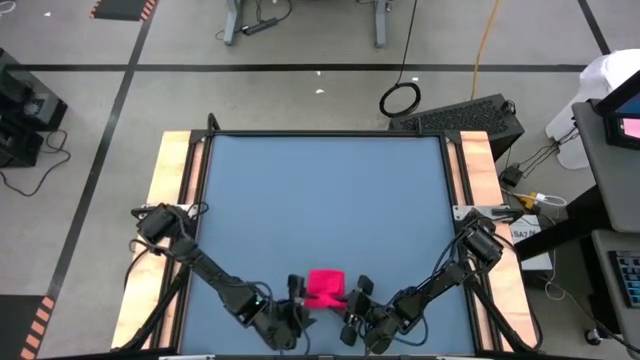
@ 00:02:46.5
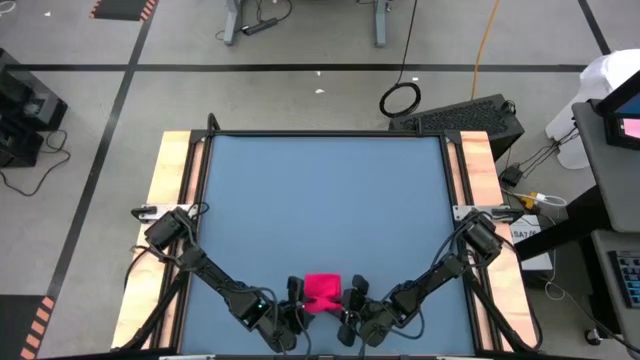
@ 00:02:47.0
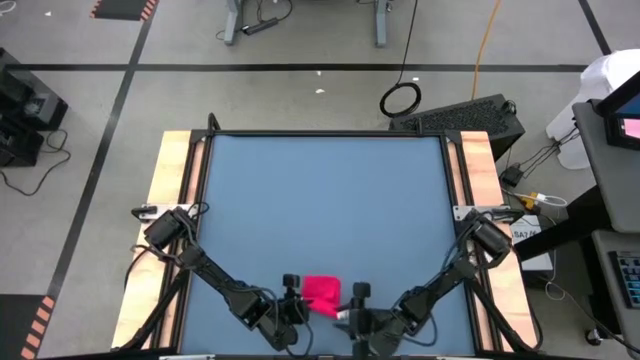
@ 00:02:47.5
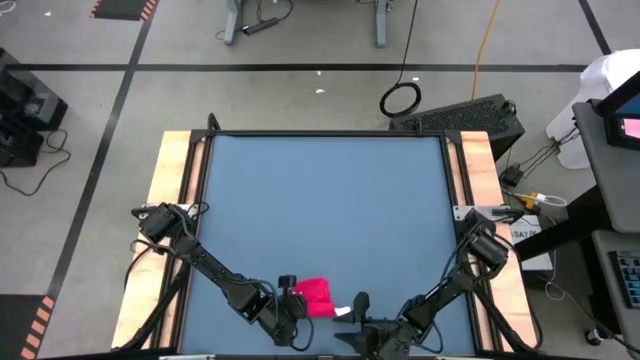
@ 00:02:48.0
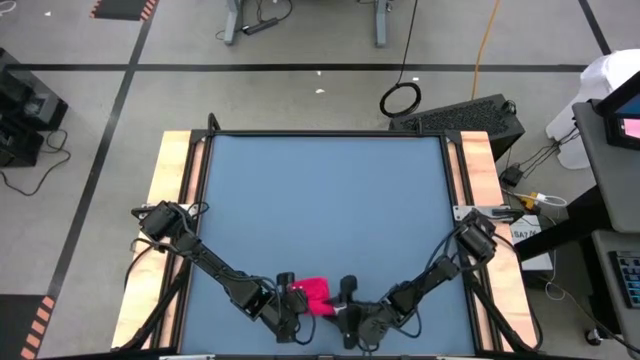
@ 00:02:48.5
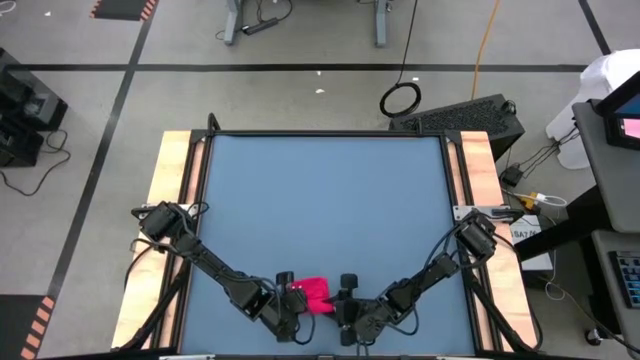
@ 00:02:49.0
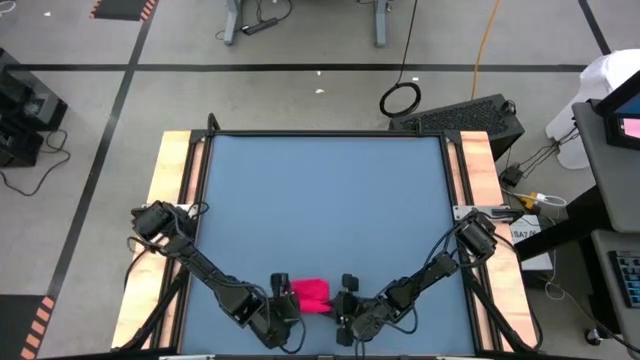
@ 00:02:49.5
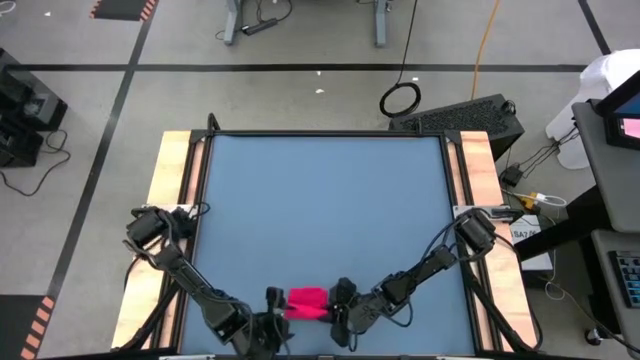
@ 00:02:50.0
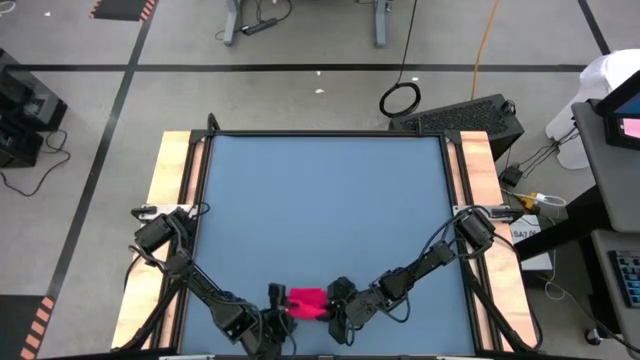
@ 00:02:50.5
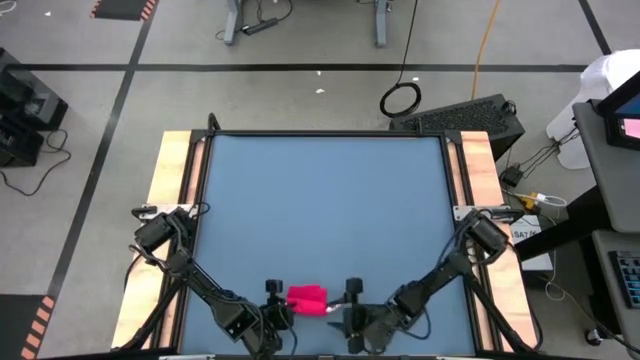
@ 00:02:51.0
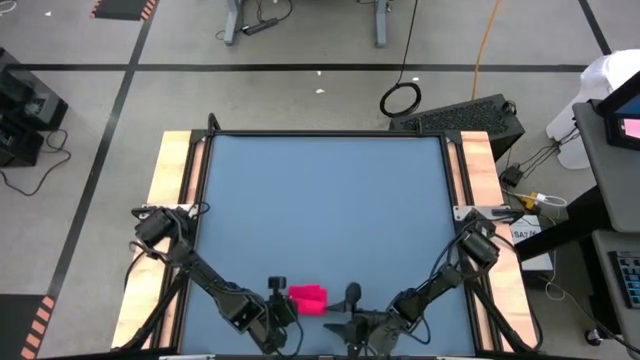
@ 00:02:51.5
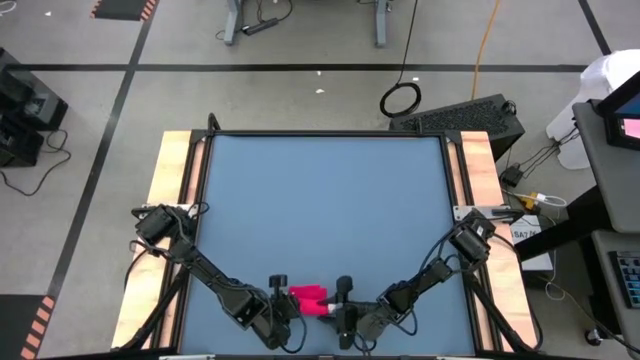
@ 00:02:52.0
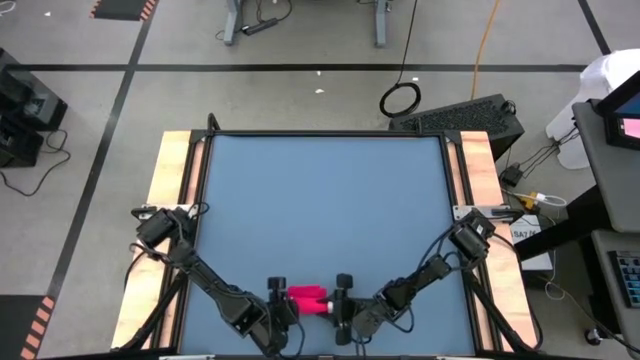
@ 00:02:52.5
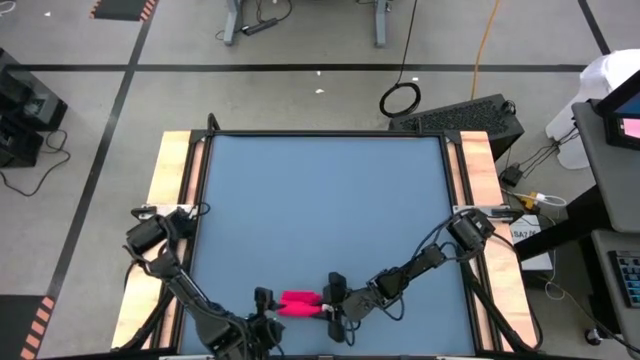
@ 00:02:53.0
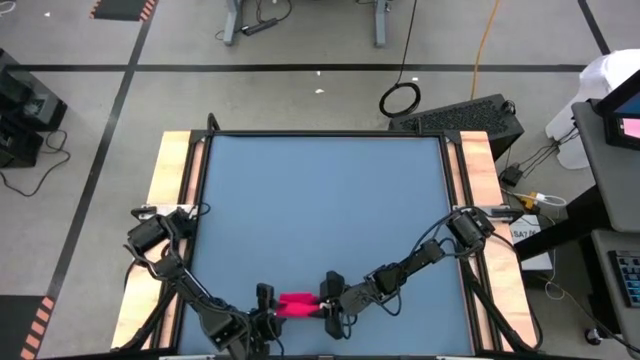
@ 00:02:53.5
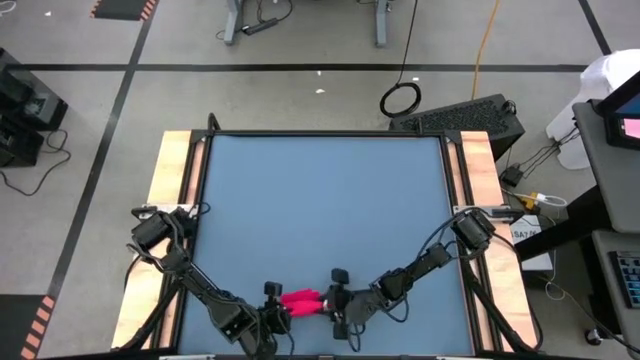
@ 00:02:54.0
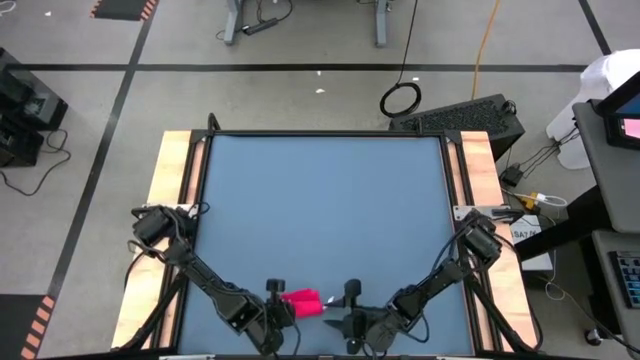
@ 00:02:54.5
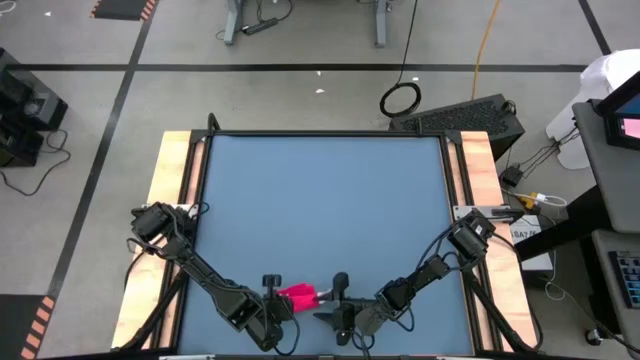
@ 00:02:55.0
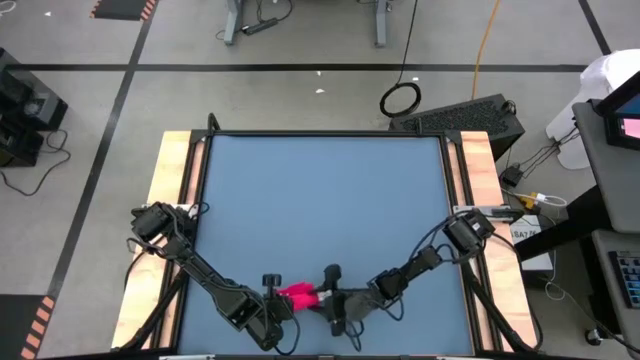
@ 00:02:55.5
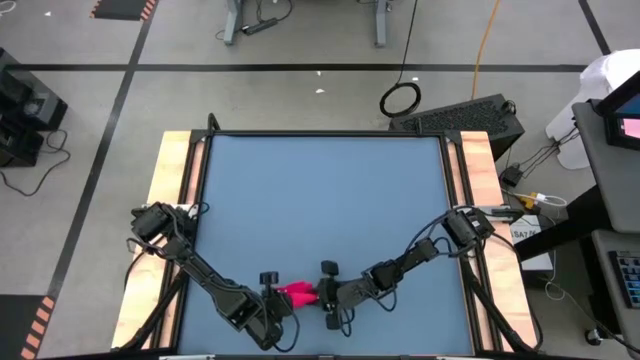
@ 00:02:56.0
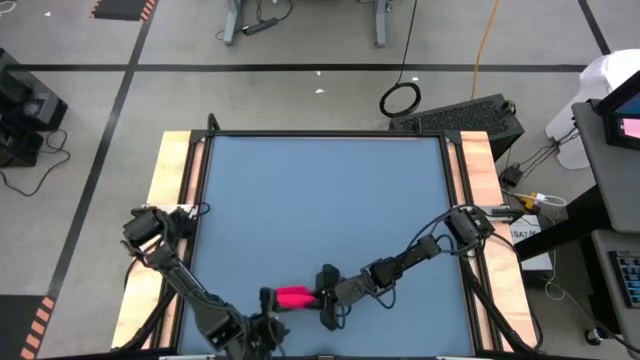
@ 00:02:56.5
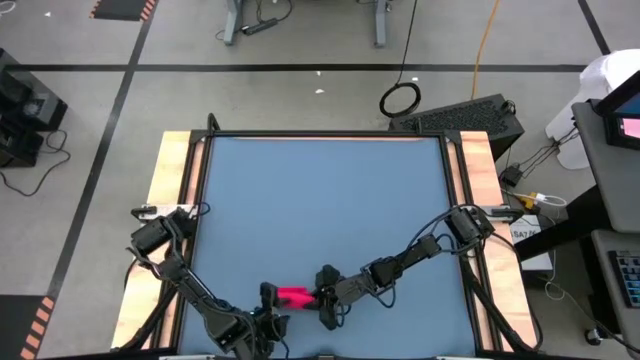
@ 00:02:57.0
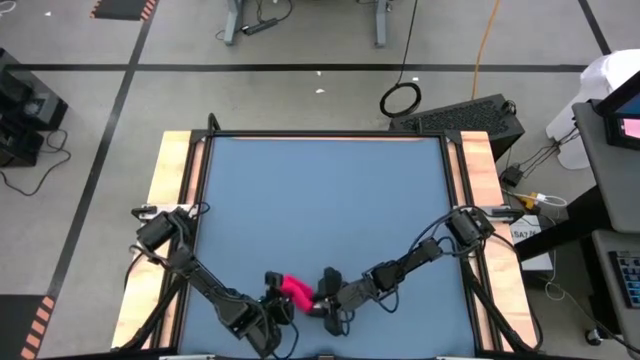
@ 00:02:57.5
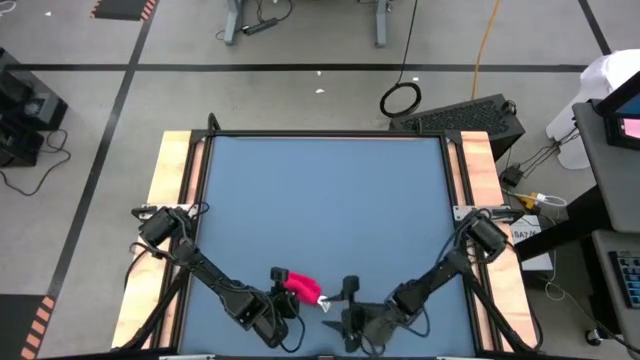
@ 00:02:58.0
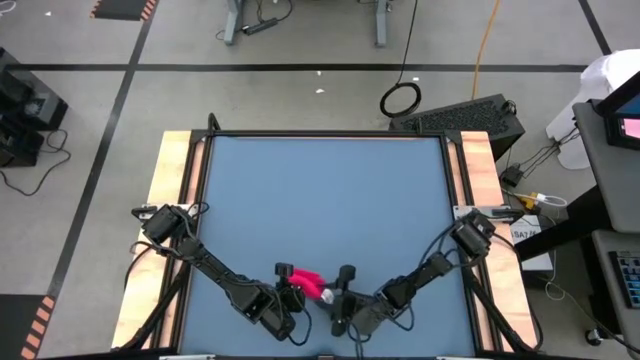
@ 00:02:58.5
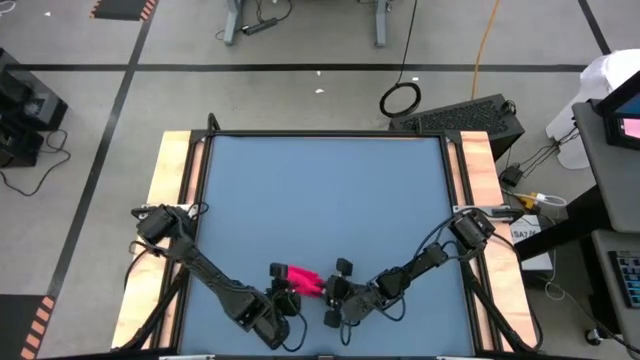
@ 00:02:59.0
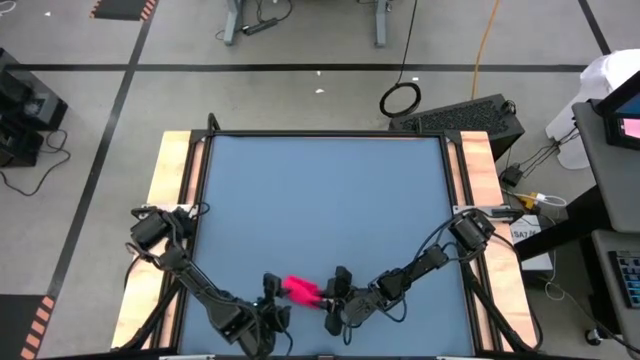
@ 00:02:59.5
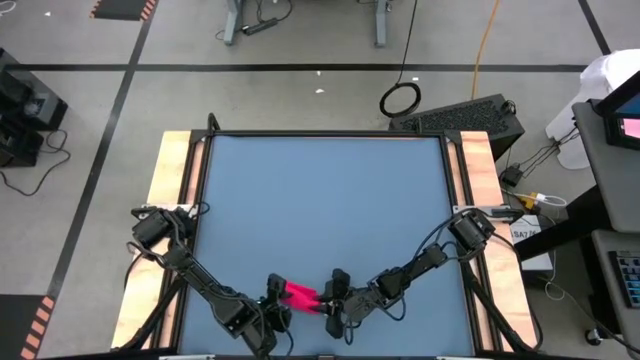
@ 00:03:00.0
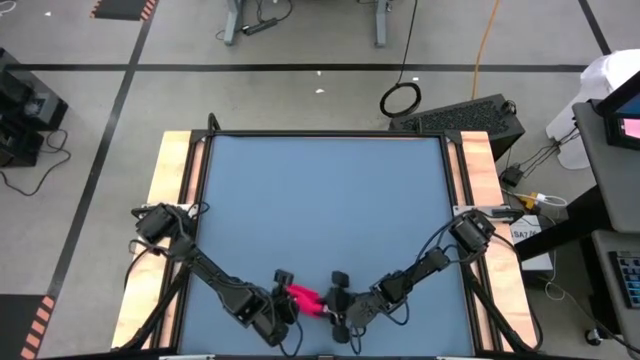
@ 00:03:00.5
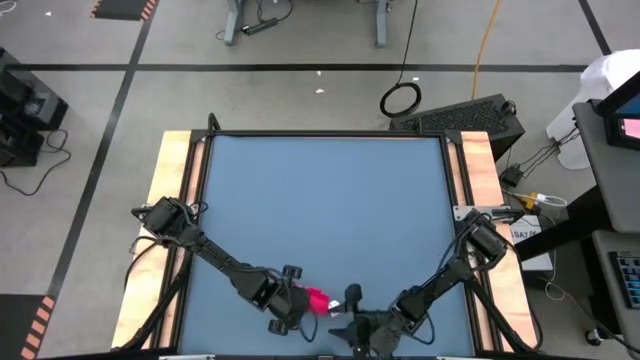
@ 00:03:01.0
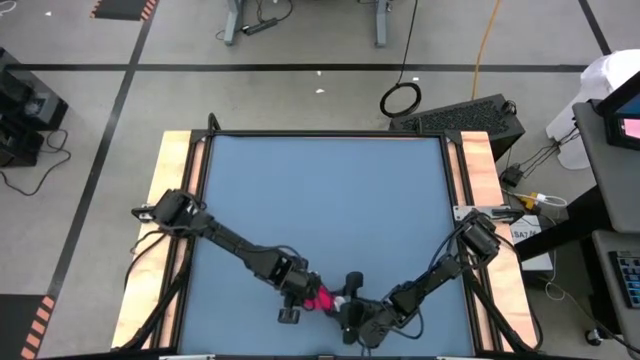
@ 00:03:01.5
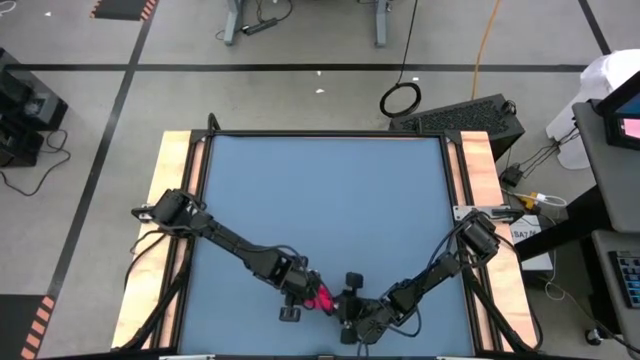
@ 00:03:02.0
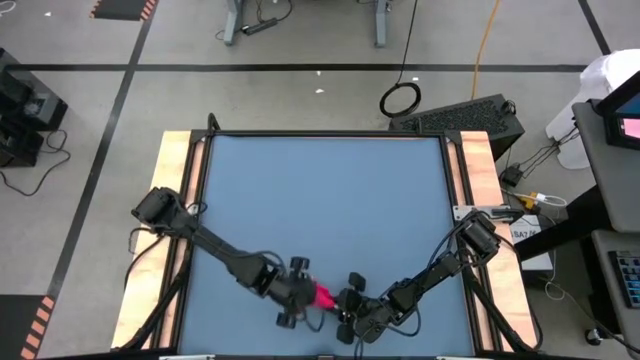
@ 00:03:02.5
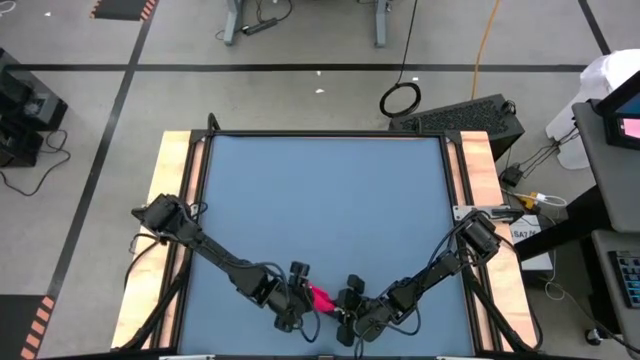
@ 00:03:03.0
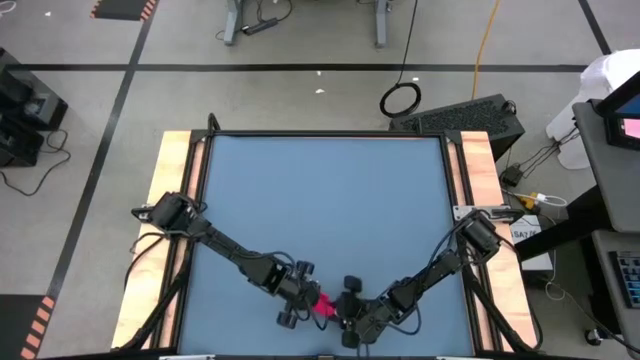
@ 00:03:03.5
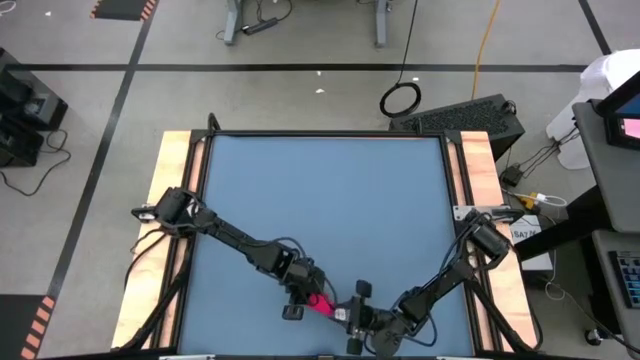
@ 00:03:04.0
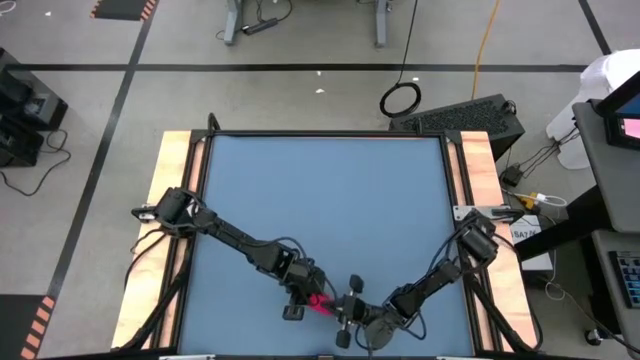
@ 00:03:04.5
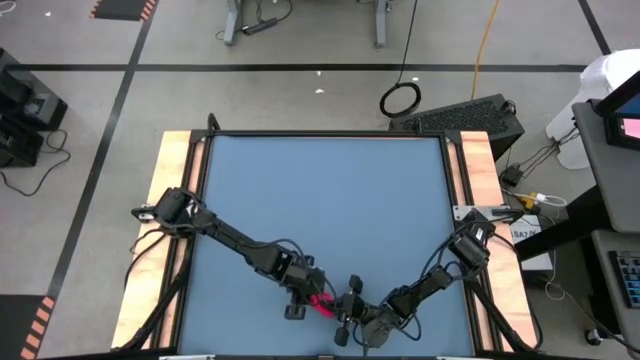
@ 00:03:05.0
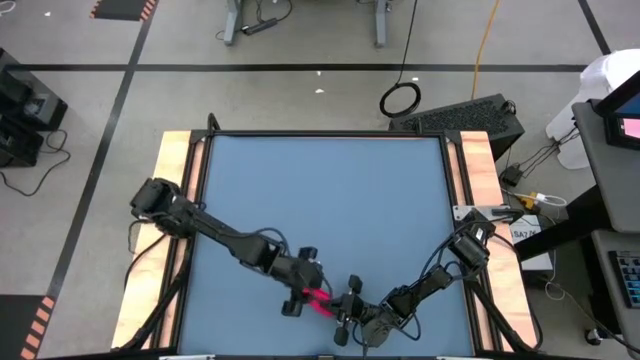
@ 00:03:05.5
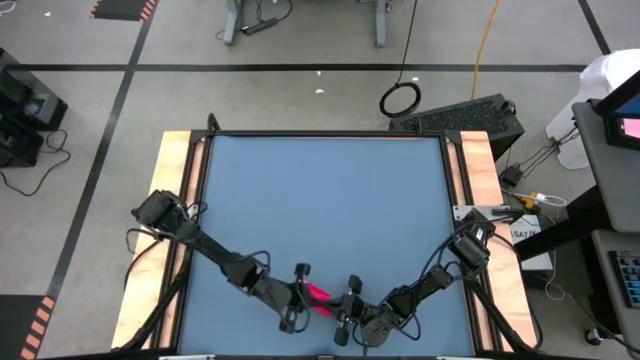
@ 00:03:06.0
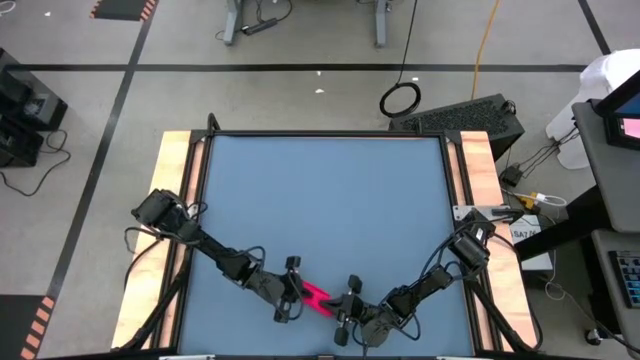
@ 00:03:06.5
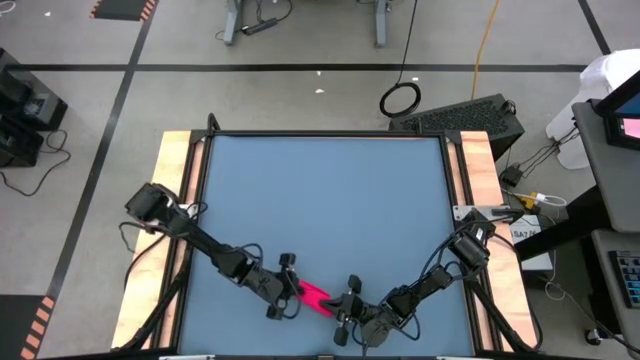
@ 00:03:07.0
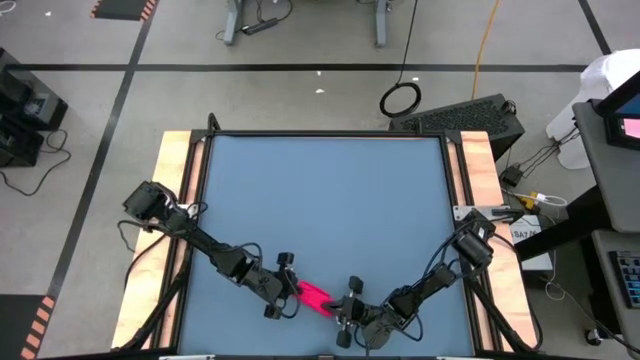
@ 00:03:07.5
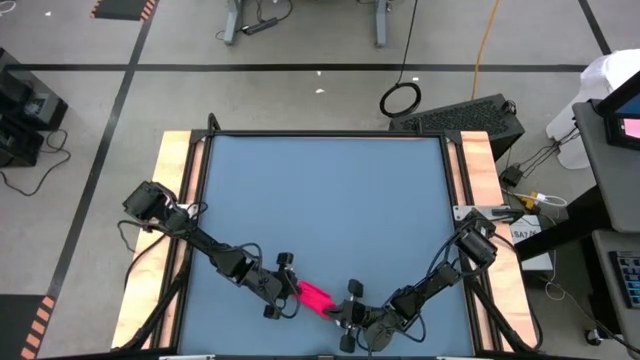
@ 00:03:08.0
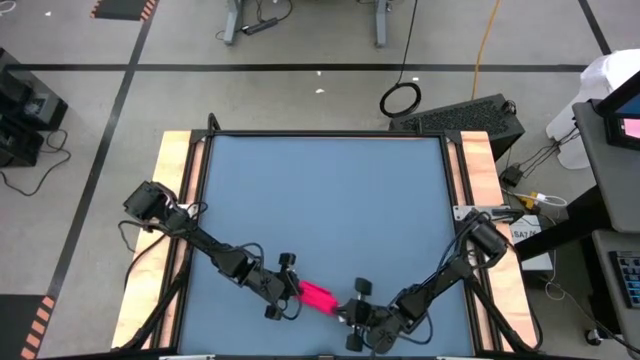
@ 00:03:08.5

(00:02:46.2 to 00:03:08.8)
Task: Roll towel
Roll the red towel
